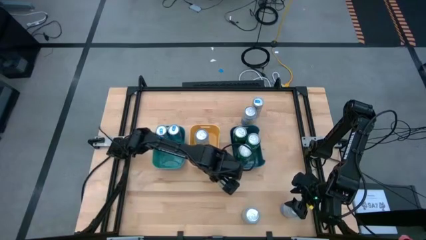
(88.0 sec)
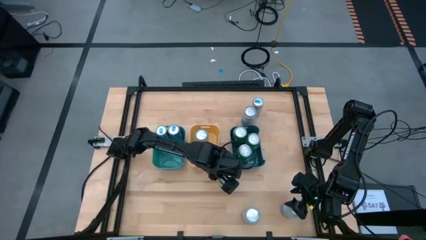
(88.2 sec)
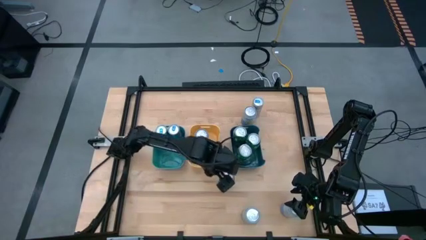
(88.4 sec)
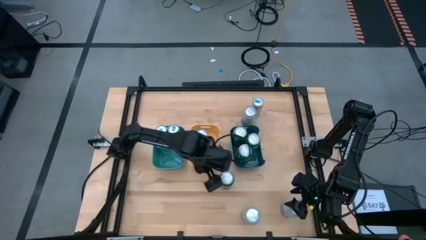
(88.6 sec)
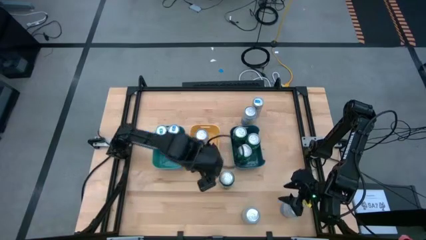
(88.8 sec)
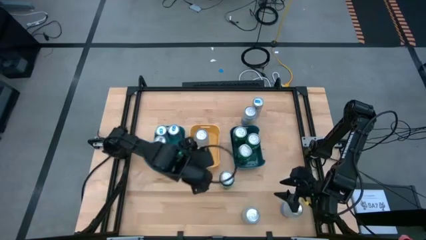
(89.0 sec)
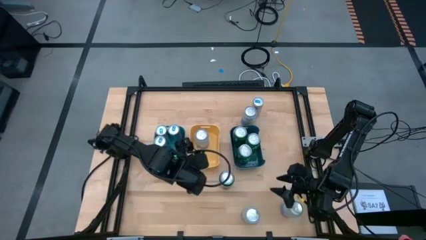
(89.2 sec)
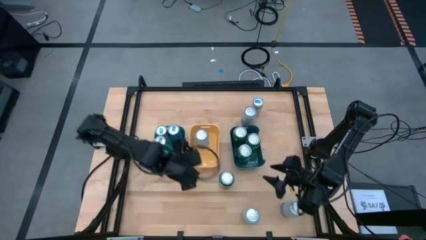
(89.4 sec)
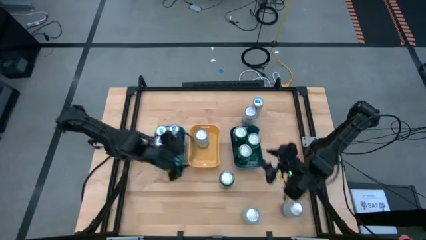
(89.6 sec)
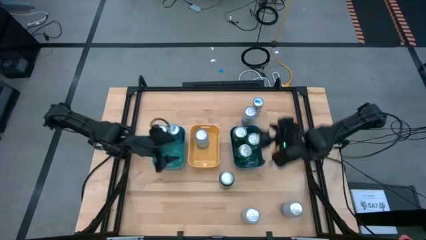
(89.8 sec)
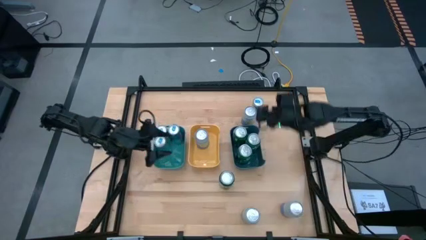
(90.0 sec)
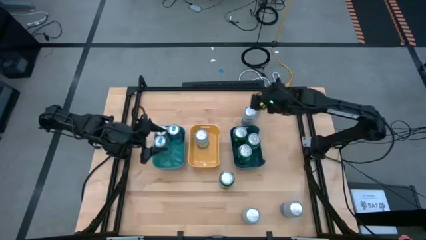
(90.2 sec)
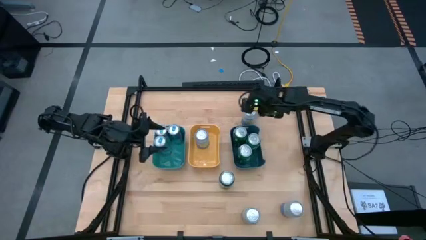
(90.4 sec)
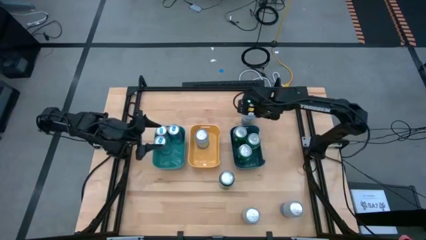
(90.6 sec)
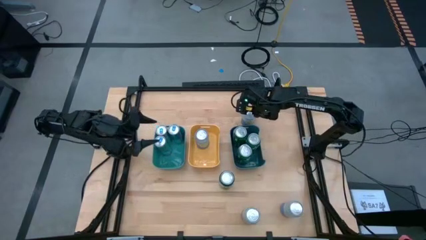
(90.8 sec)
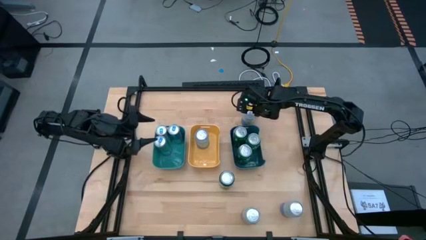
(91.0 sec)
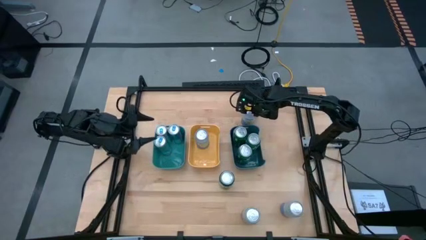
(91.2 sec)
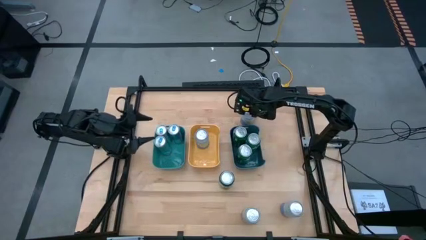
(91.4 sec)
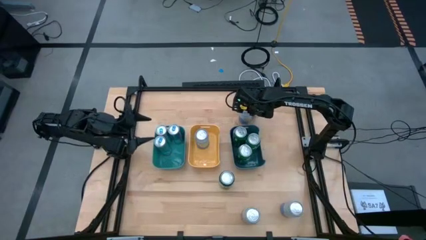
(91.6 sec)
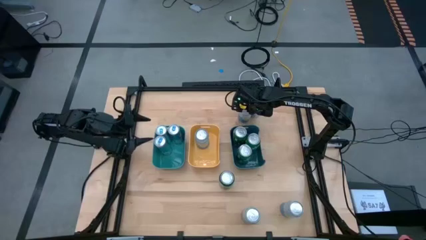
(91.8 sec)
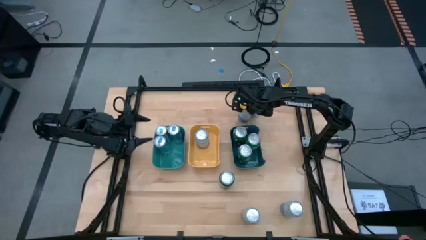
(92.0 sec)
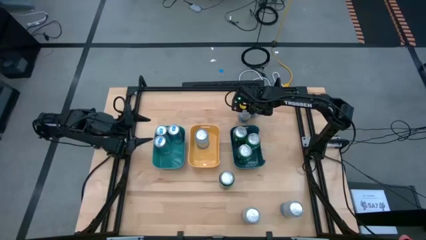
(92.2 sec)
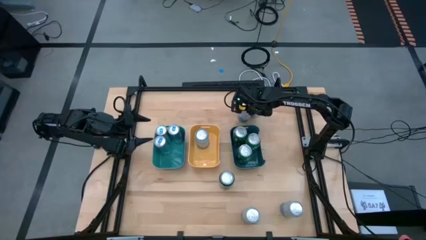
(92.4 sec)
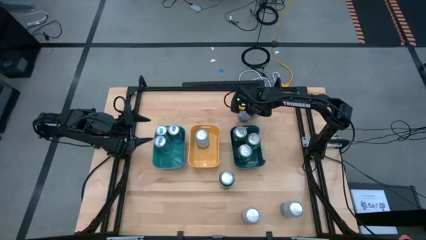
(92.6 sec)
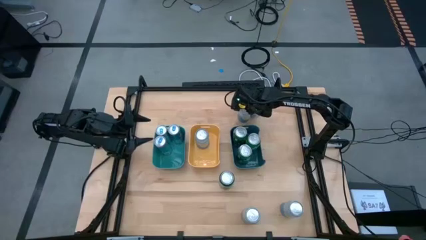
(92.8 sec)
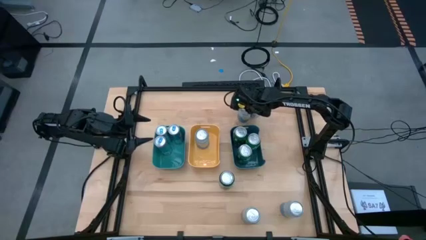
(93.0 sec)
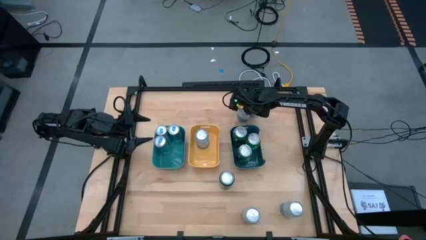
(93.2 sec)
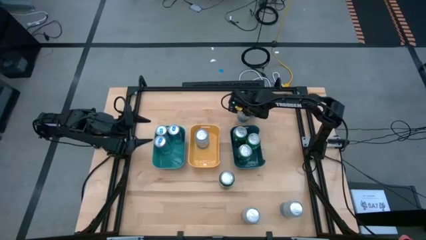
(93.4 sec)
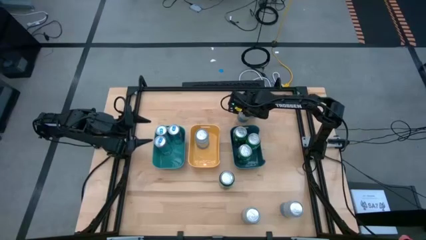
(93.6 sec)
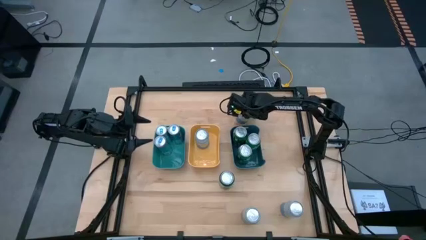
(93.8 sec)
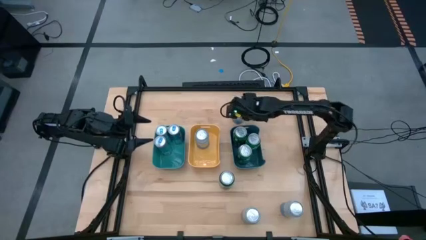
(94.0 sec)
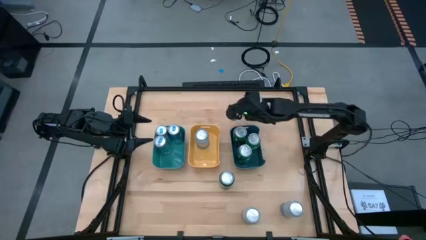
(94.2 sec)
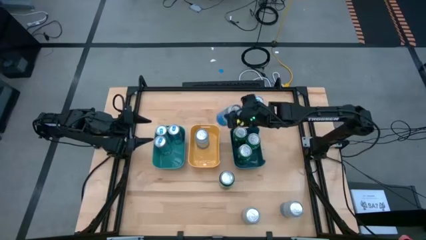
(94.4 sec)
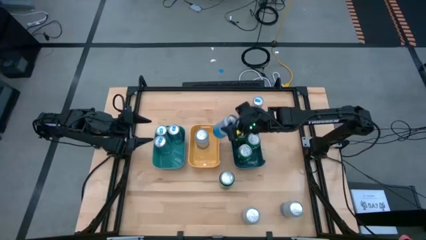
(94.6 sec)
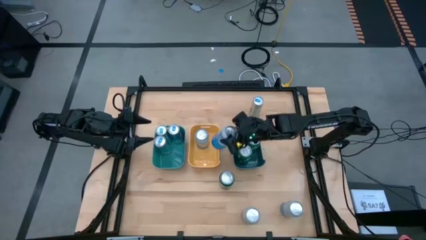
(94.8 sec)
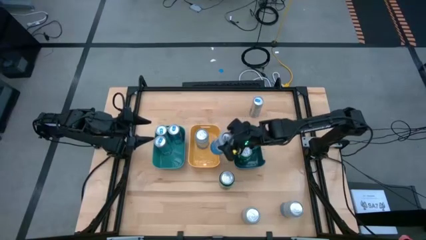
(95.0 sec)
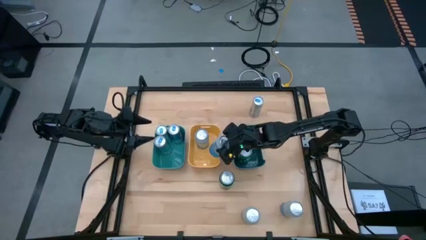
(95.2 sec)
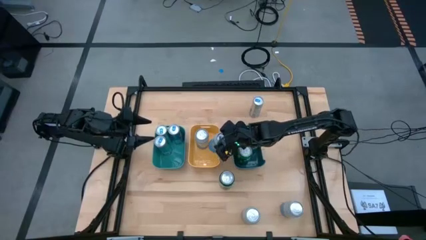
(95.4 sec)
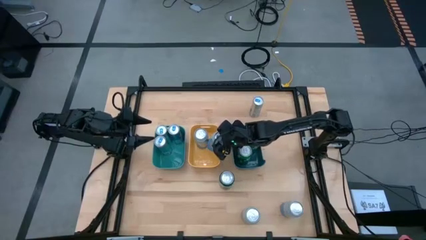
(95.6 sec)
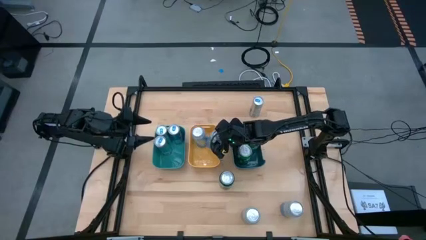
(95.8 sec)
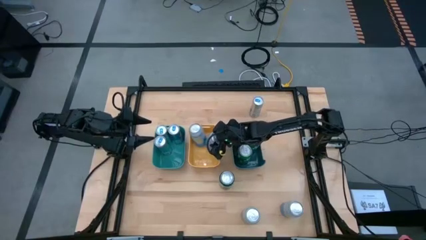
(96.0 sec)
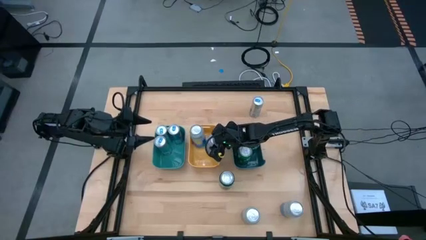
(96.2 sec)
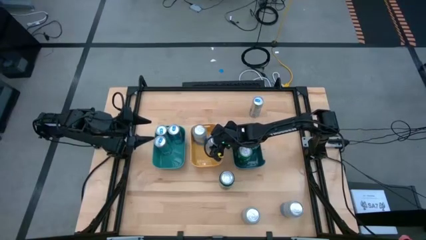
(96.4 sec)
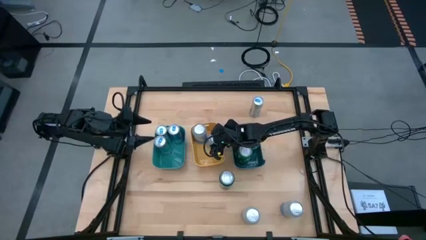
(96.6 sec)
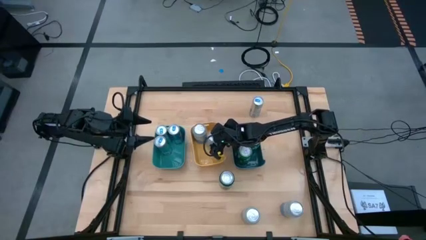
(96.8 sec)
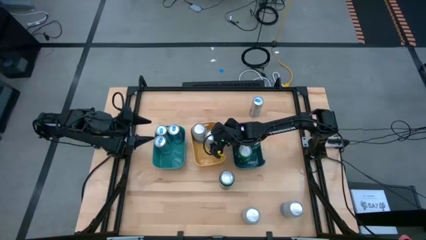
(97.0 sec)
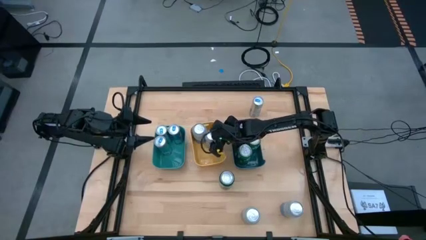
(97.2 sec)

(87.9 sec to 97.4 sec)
Task: Sort soda cans
Put the blue-white soda can into the yellow bin

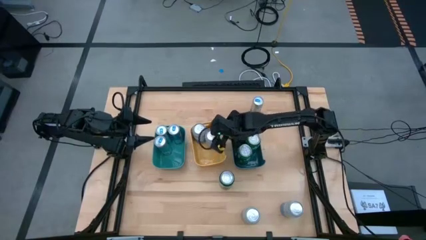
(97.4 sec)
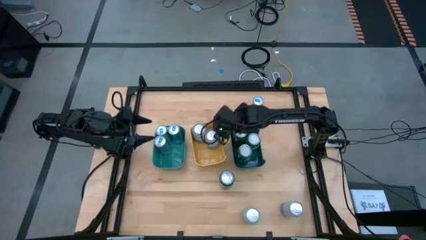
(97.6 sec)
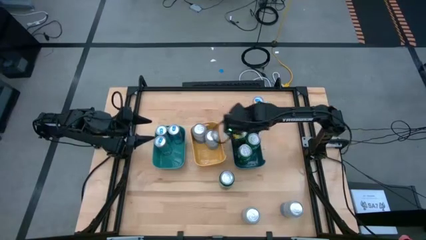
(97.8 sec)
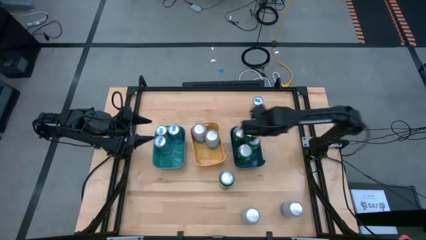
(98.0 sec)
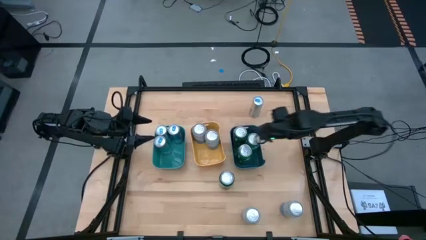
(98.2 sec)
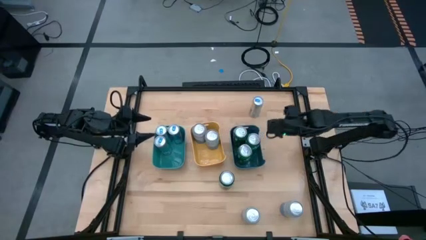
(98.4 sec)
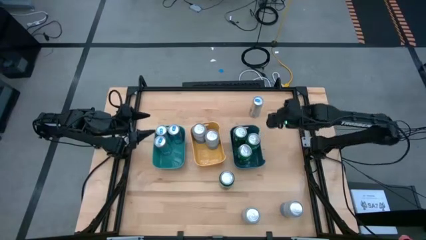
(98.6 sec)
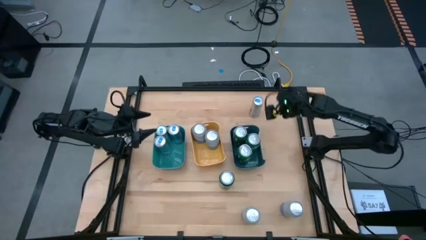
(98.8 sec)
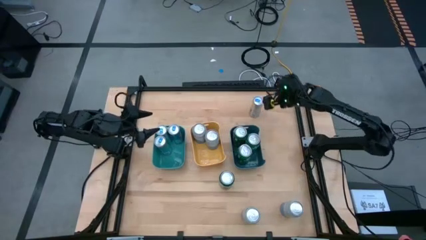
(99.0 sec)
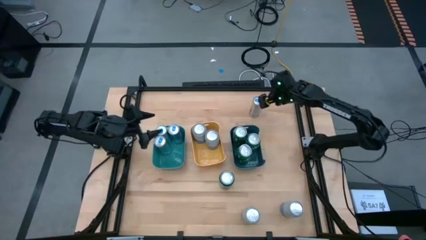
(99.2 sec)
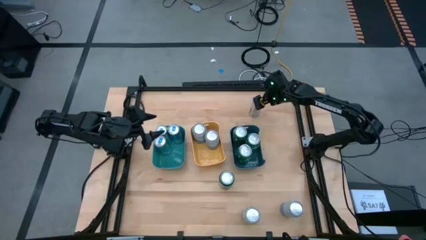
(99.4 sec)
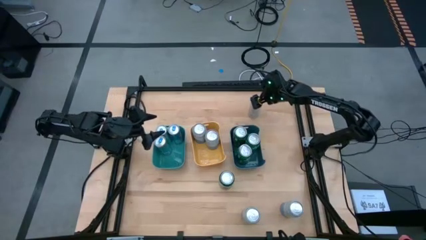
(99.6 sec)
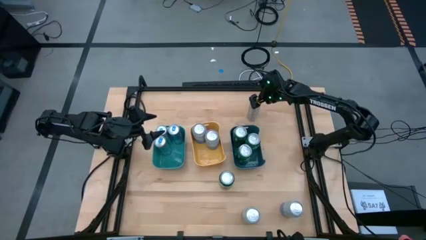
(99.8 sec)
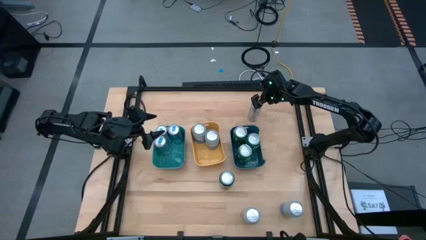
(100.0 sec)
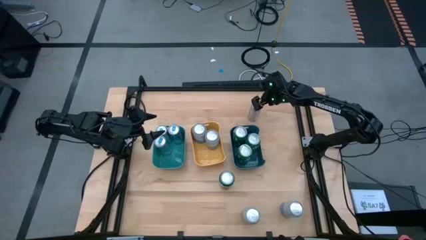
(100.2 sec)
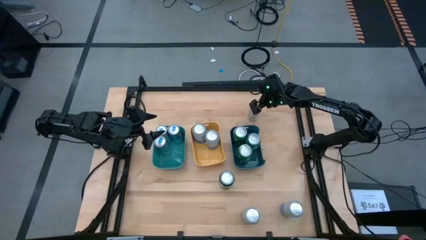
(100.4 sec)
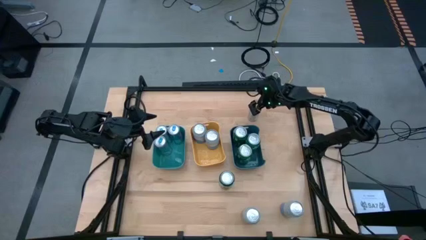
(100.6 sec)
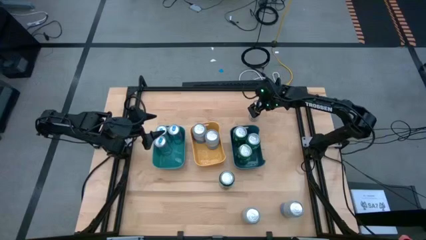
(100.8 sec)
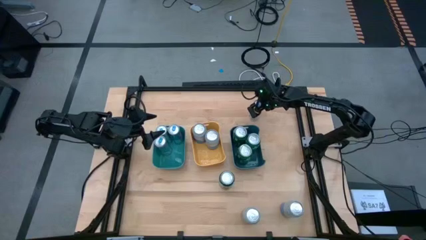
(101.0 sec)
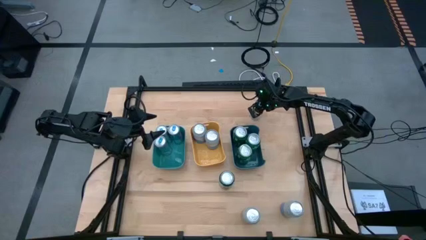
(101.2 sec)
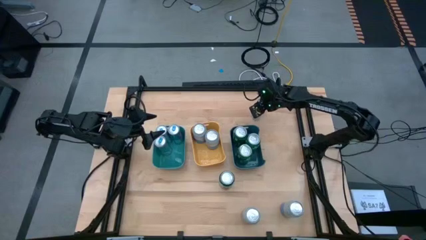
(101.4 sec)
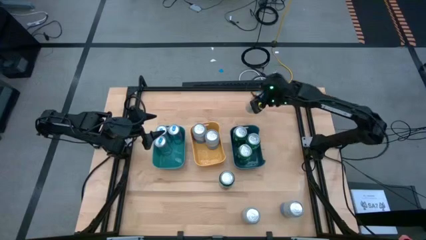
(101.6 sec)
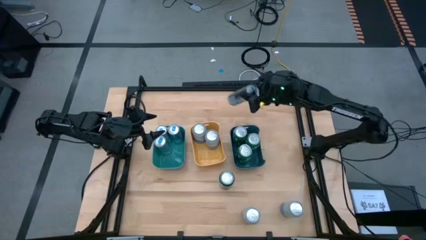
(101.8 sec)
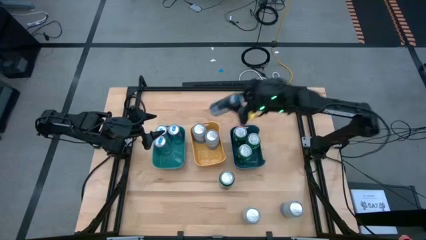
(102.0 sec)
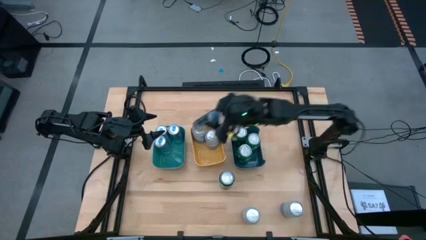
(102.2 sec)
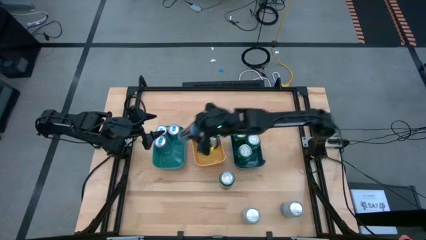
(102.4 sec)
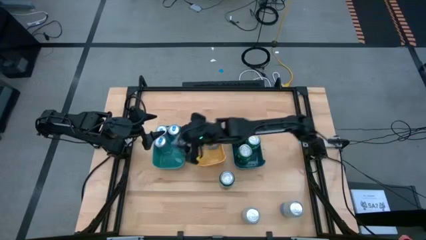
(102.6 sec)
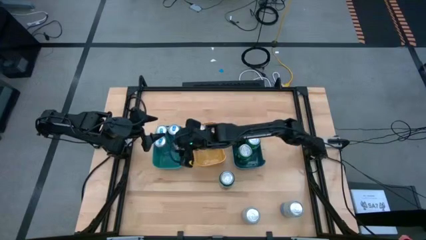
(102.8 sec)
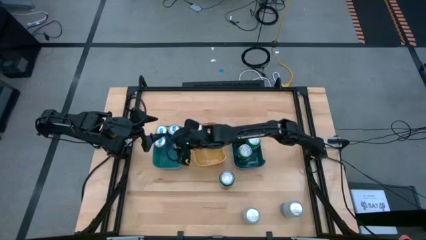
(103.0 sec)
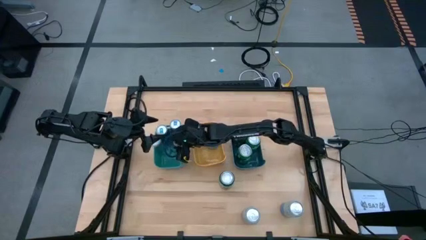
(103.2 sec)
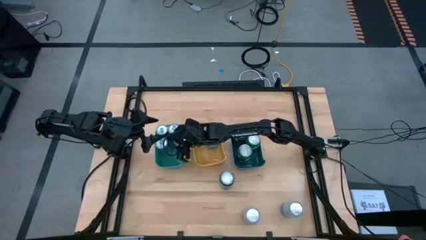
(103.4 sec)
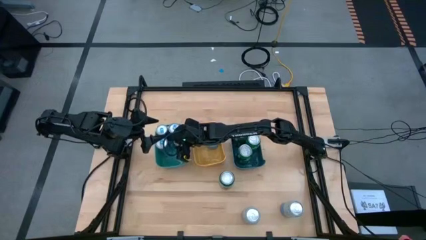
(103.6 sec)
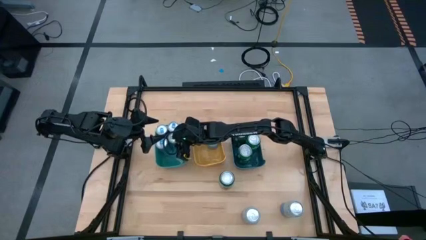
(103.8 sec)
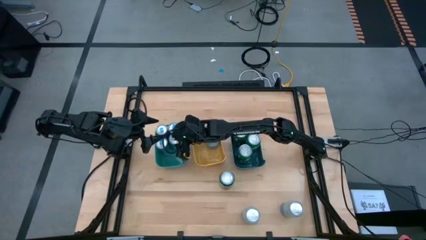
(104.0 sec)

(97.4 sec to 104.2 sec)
Put the blue soda can into the green bin
